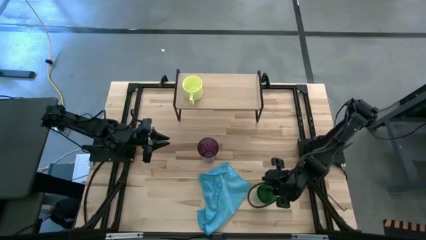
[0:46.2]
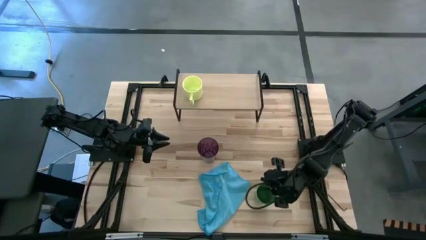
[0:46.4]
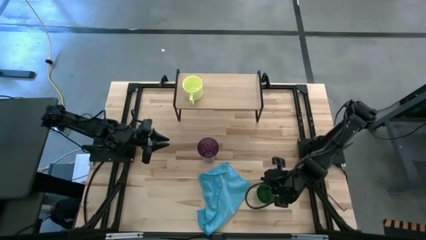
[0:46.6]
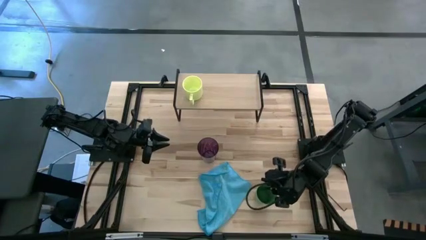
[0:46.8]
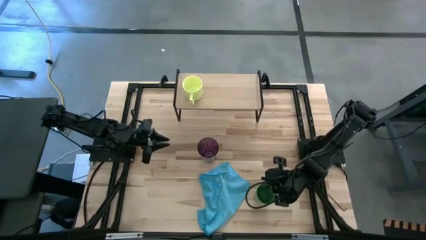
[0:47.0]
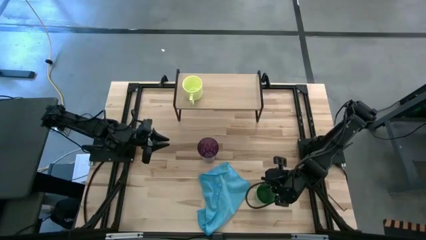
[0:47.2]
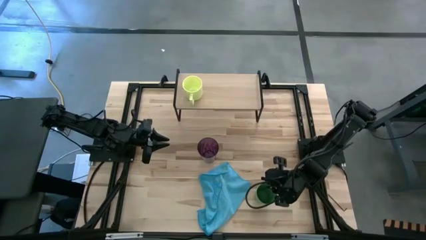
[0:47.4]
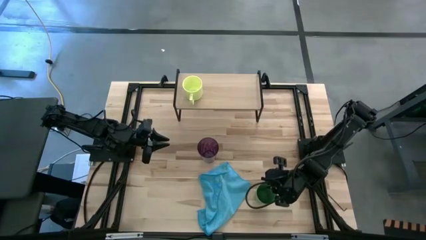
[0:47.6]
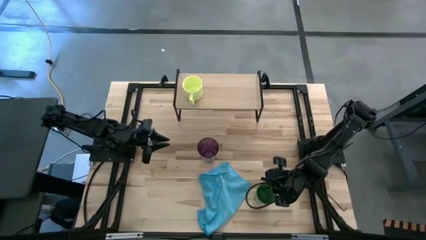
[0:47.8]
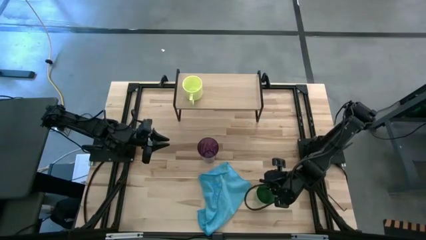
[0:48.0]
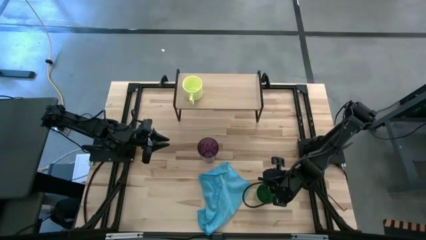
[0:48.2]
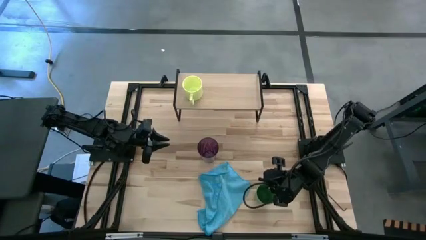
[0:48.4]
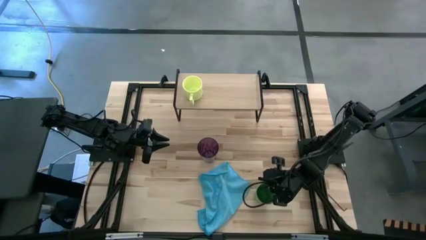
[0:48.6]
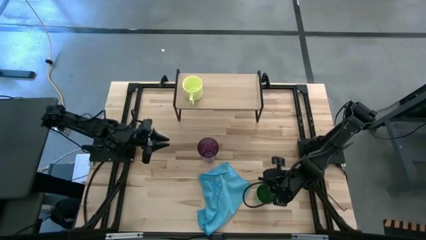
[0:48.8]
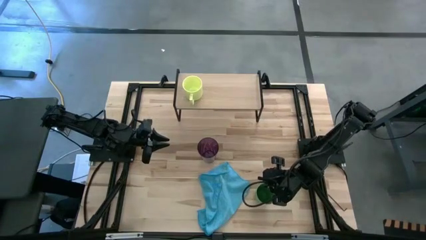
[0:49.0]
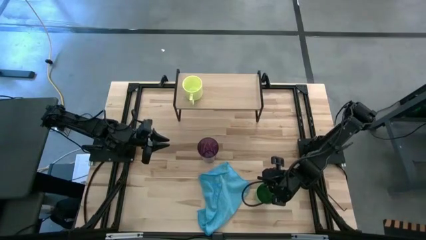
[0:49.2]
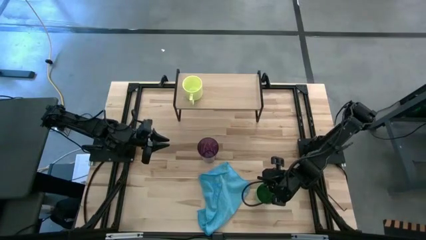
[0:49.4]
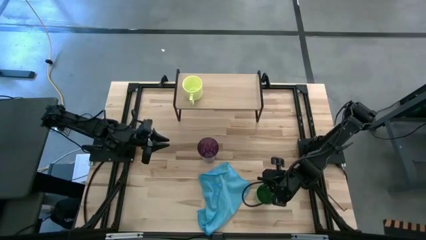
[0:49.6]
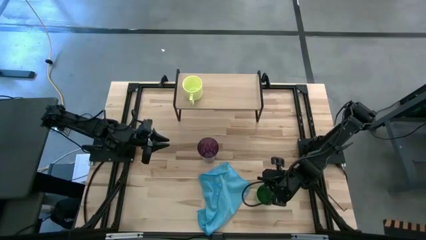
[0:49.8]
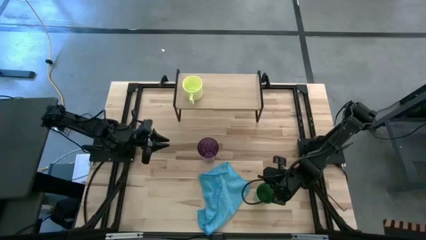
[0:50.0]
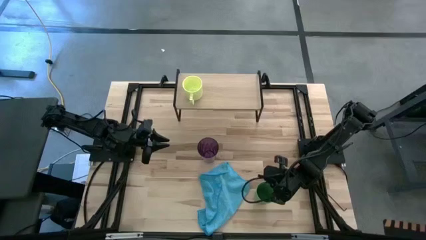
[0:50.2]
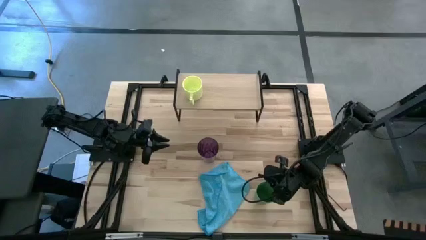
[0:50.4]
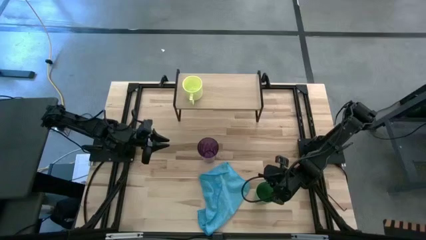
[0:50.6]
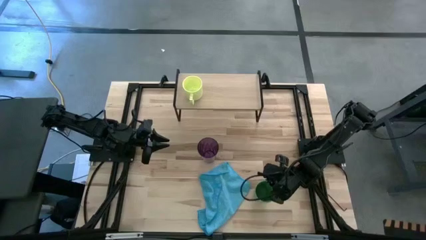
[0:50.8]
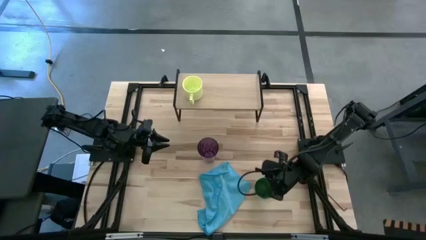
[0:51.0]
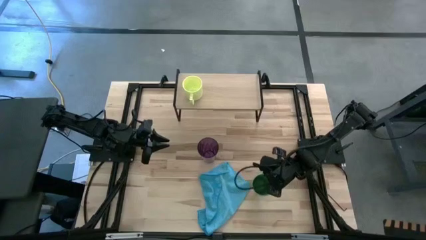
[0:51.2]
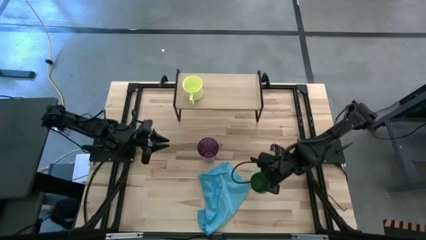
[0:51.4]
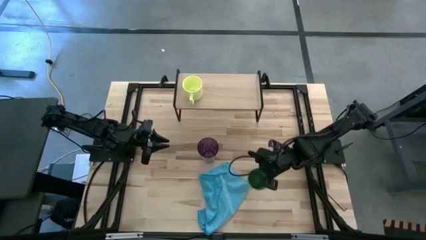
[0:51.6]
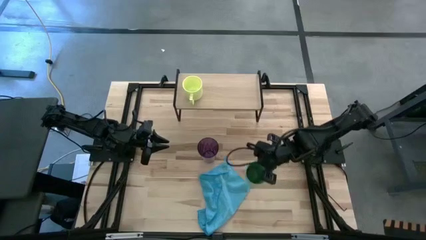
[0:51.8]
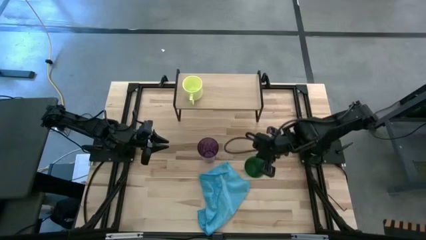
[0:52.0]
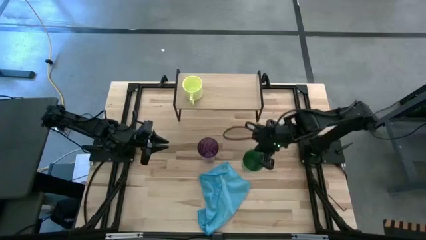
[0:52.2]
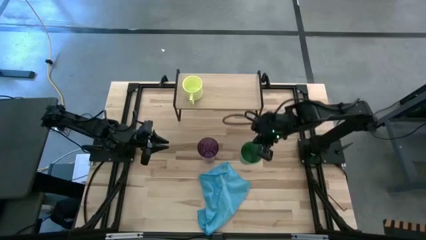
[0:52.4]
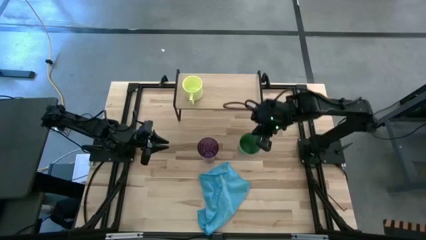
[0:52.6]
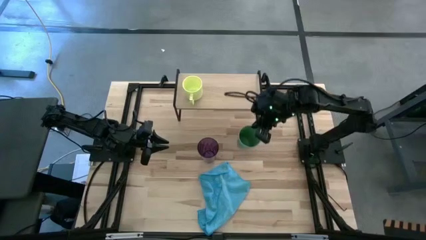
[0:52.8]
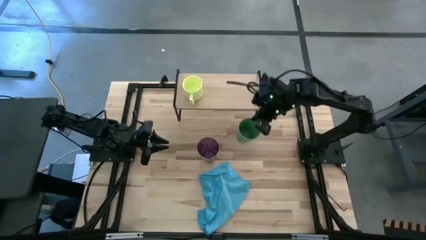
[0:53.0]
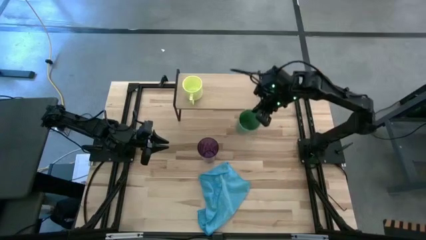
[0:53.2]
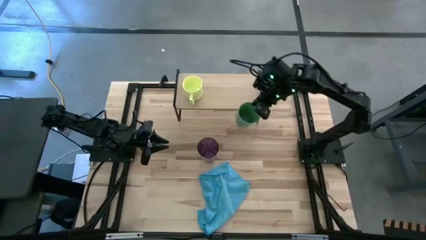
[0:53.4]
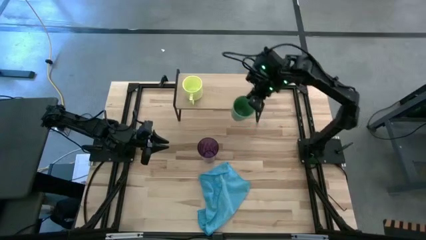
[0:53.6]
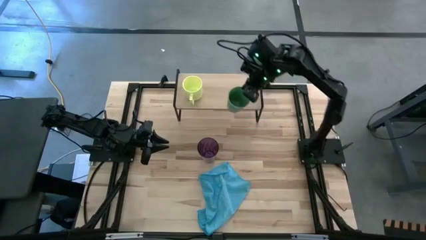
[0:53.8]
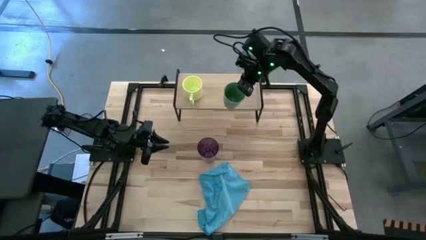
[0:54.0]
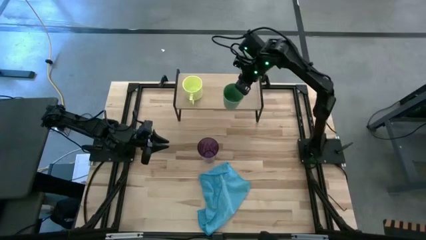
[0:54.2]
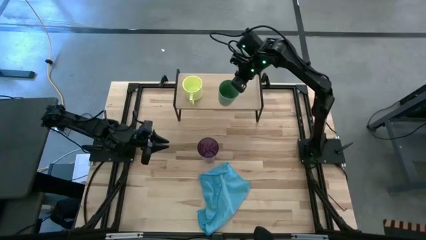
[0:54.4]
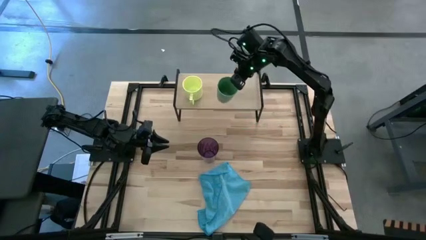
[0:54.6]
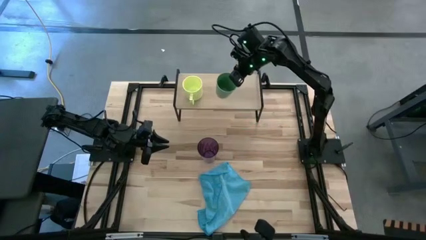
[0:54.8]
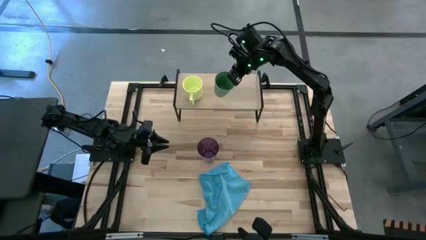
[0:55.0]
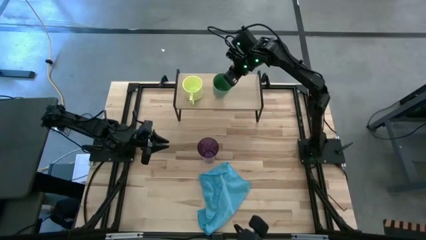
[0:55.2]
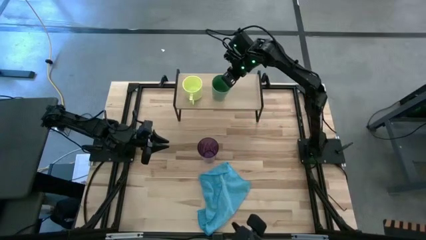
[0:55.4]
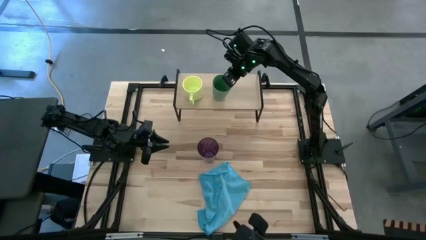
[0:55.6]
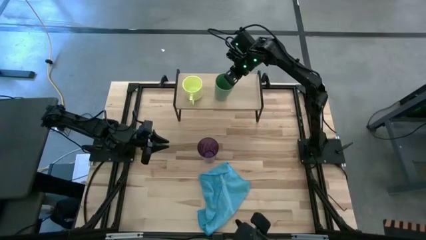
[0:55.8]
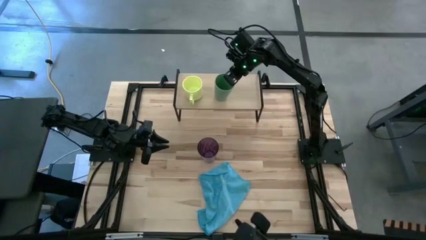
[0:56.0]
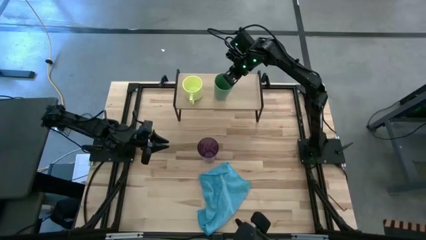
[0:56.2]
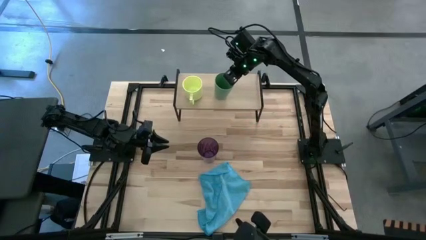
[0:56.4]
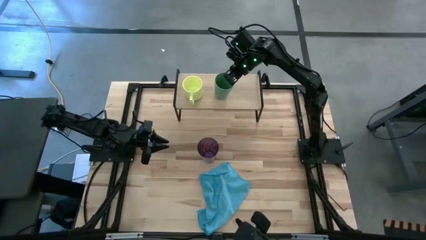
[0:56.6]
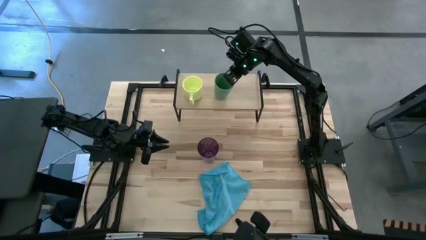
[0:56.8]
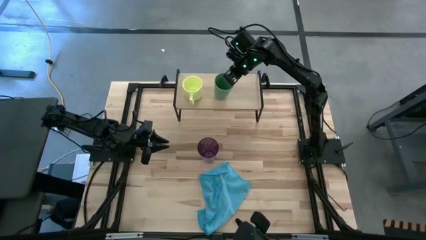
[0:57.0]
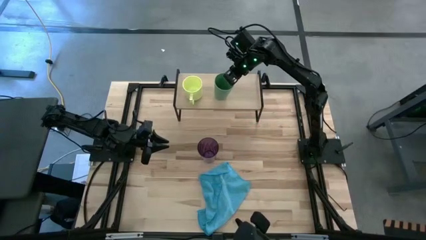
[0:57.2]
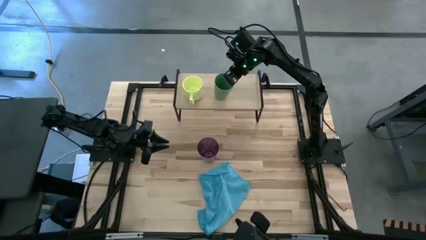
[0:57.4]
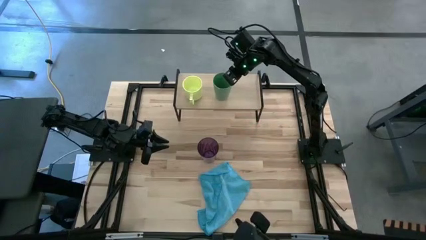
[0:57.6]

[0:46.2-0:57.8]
Task: Stack small to large cups/mugs on shelf
Put the green cup on the shelf
